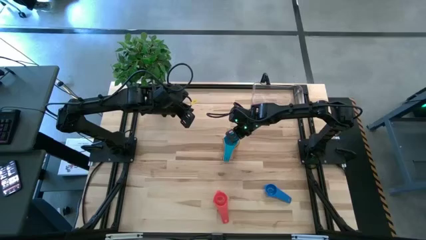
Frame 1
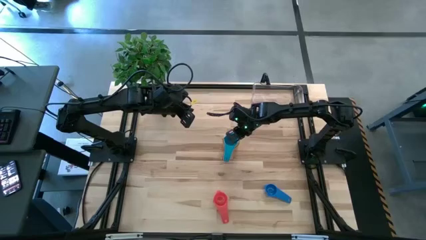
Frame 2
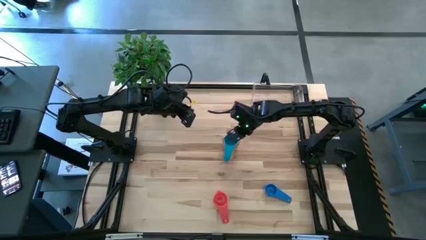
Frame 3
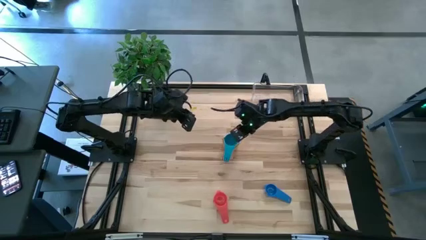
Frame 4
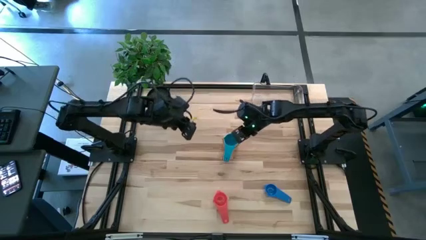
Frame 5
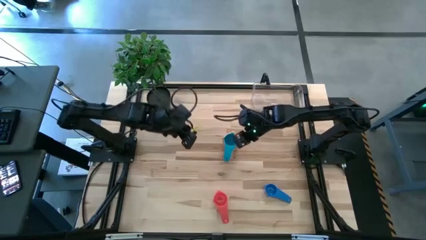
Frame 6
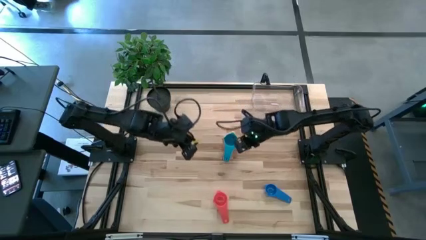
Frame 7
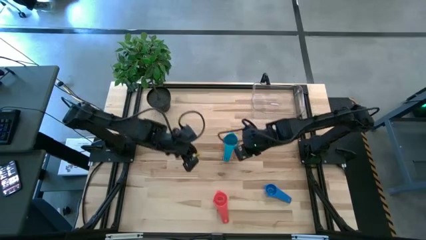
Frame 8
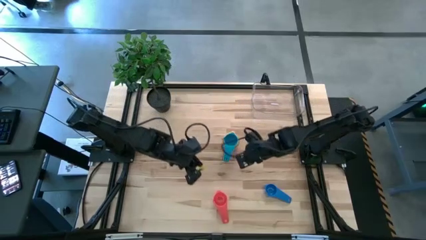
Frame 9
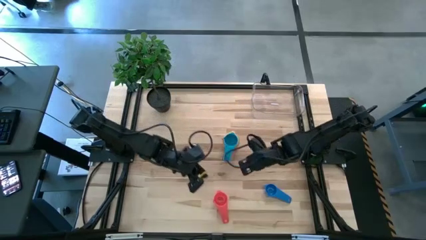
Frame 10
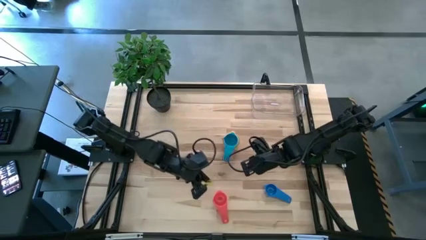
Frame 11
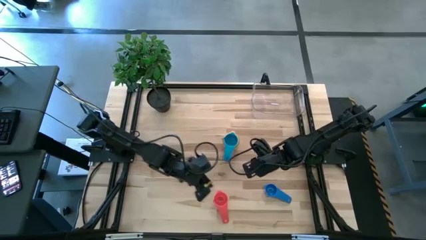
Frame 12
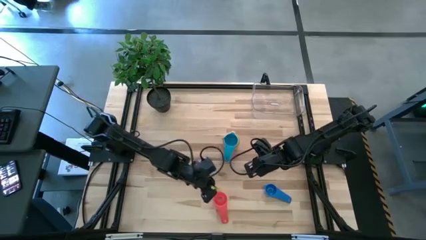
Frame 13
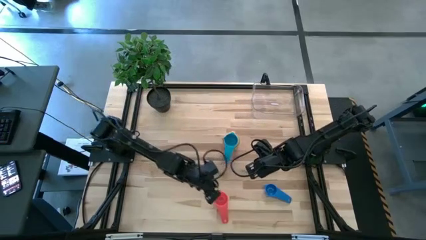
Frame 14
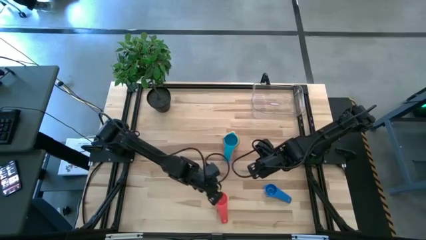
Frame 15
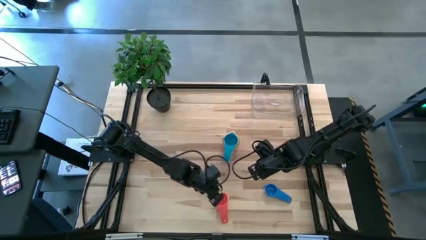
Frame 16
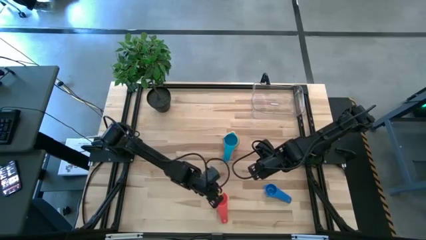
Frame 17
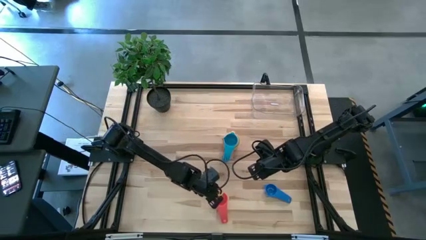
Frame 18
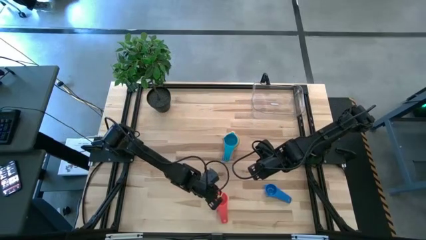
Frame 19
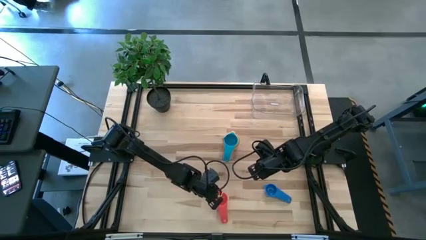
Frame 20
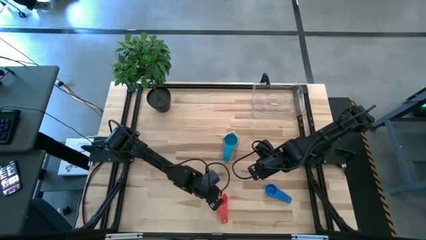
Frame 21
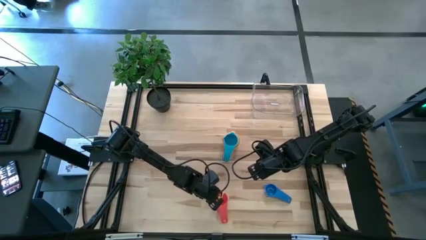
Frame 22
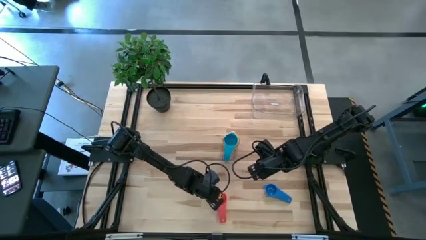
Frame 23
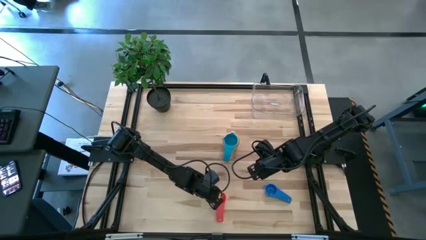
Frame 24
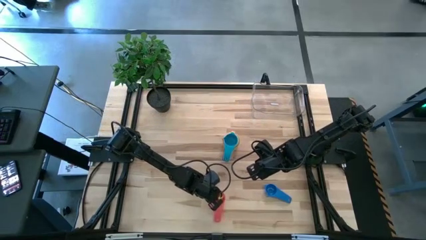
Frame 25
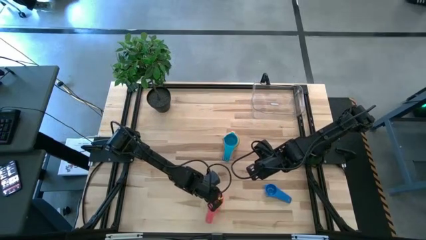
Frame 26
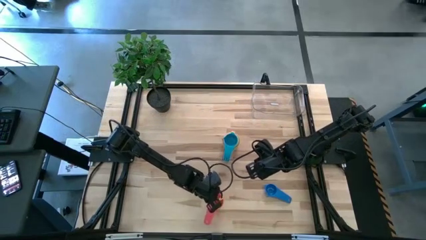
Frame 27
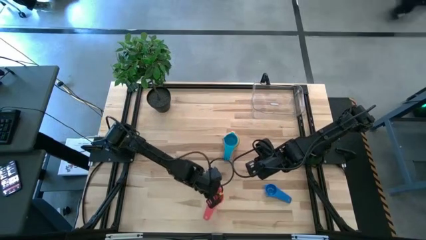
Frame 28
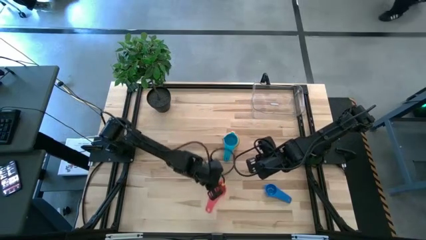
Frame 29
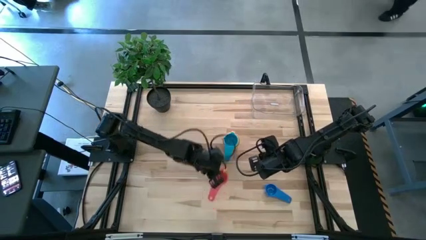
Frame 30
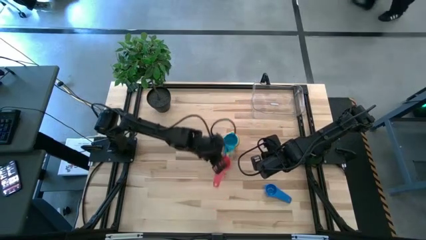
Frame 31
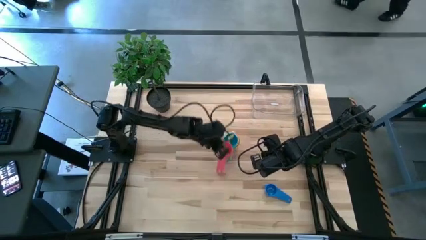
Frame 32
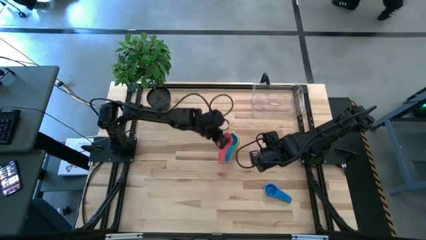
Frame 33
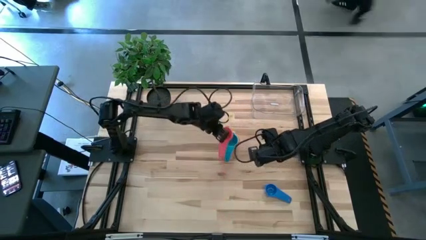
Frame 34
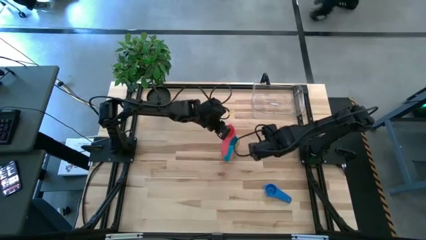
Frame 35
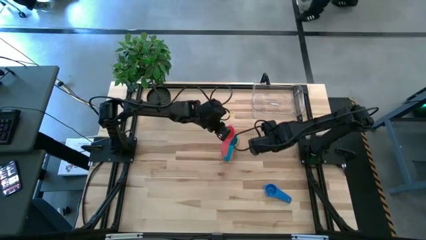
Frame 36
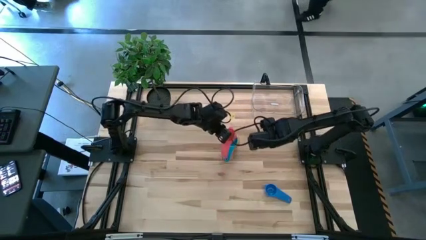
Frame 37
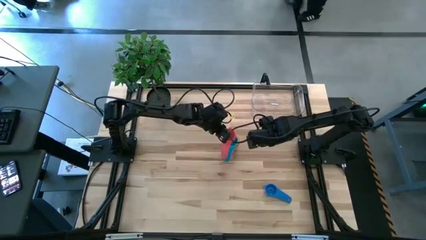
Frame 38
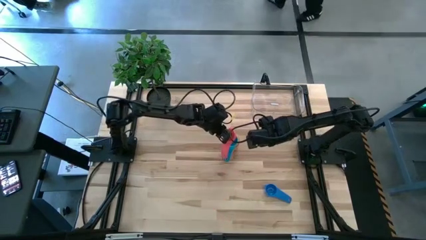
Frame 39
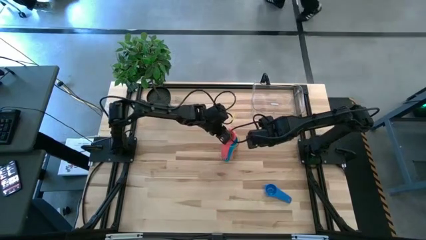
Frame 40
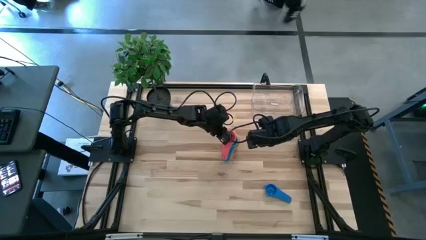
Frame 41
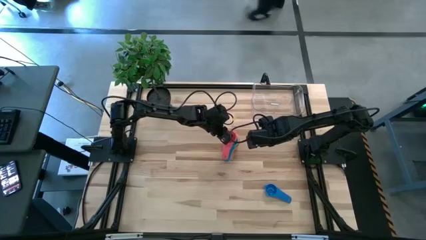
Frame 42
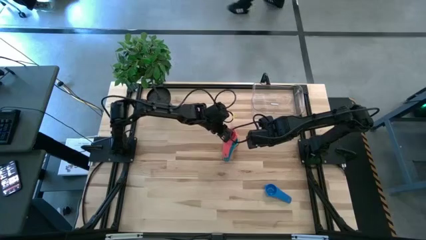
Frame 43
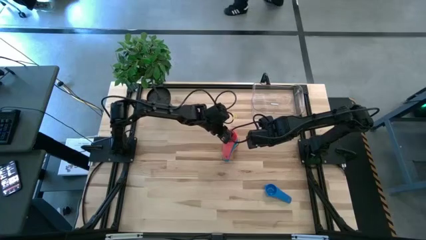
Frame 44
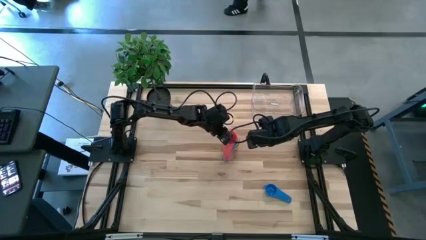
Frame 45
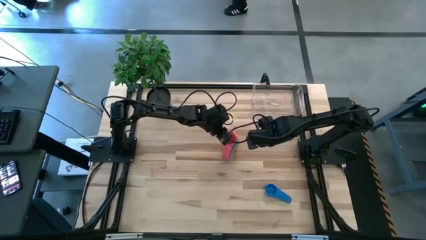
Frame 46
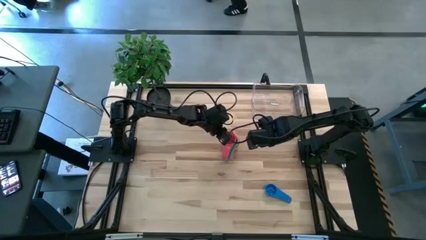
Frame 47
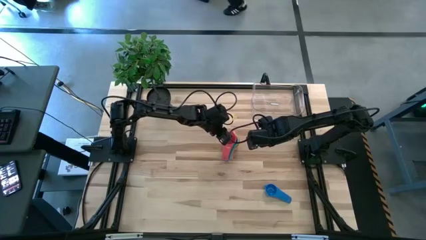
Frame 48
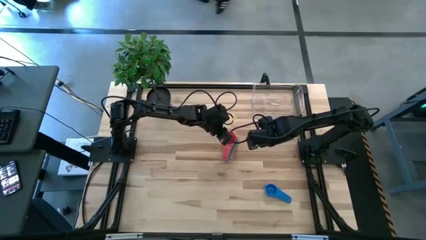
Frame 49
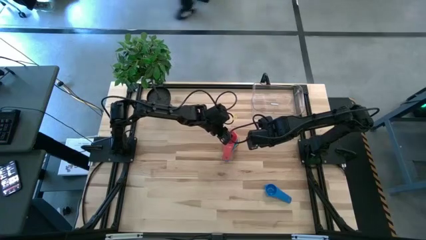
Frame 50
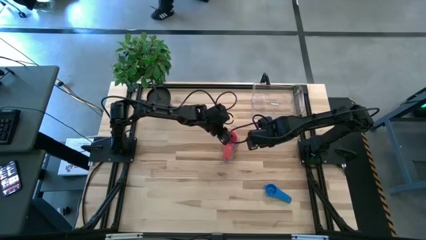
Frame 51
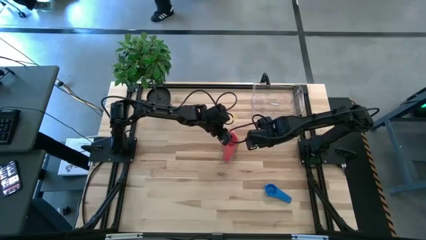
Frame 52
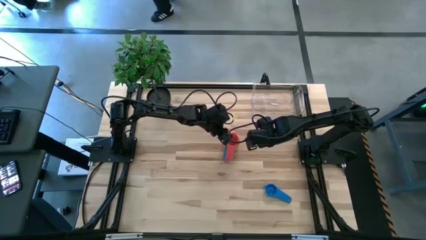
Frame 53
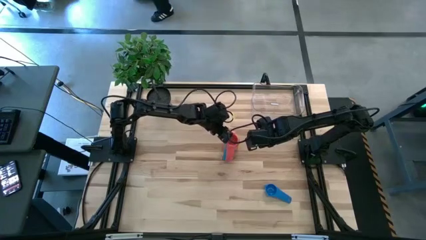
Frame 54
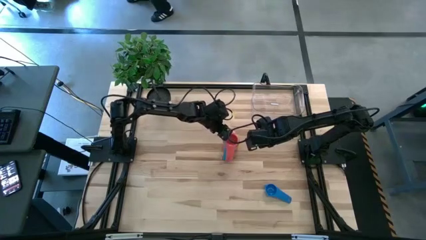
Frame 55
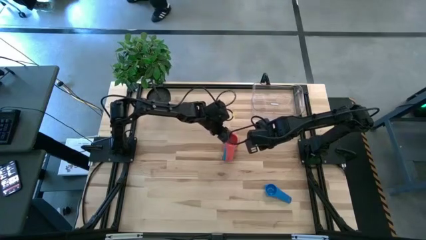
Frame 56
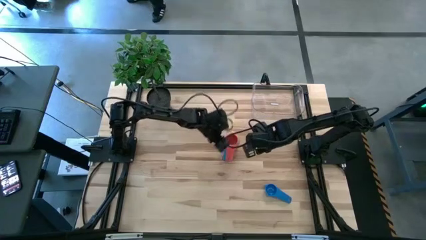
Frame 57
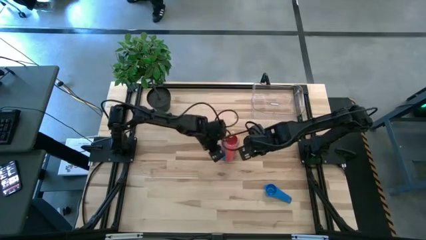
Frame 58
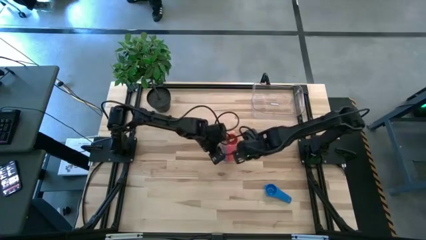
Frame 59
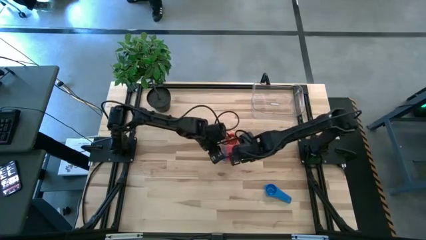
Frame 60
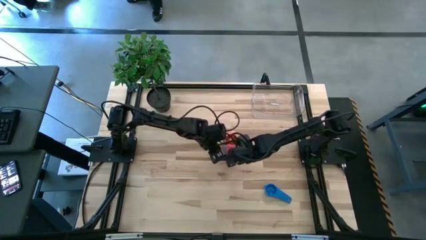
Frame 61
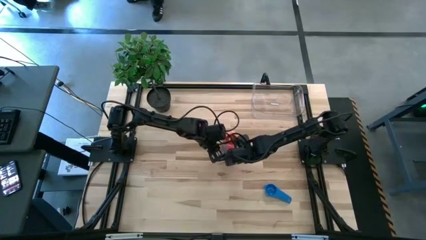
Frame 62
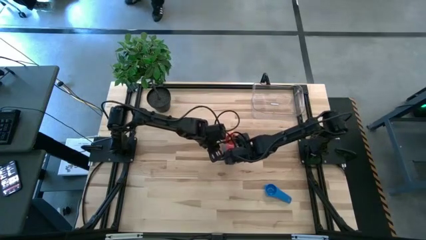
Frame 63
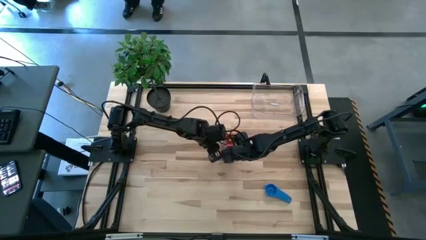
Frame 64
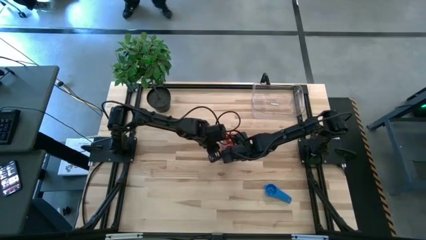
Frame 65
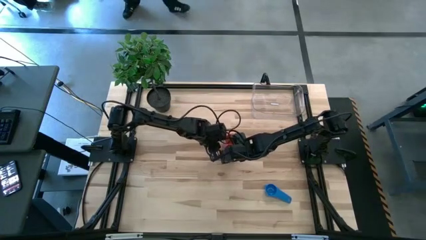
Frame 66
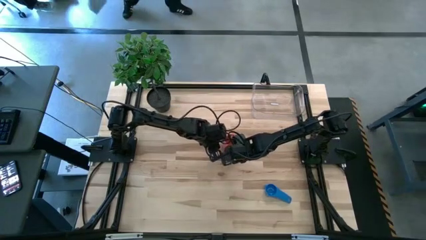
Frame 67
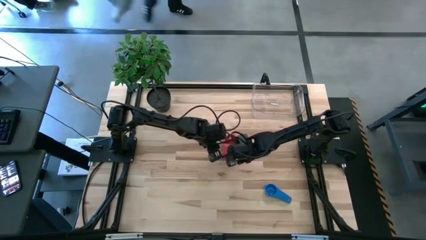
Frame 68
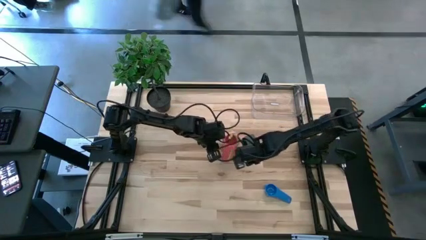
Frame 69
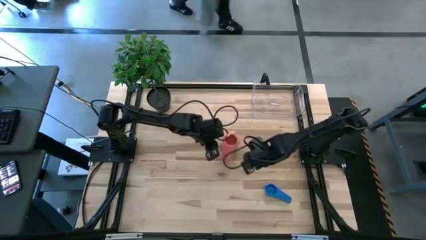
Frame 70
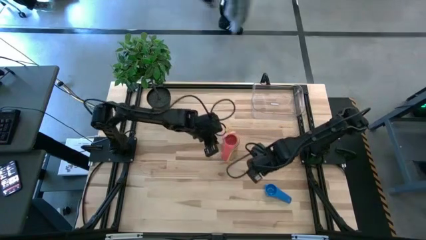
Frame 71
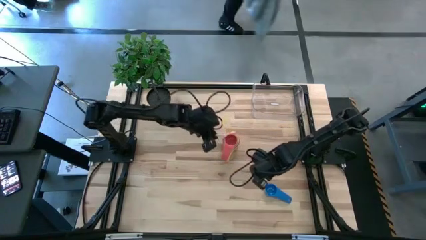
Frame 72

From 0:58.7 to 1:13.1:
Task: Nest measuring cups in basket
Stack the red measuring cup on the light blue measuring cup

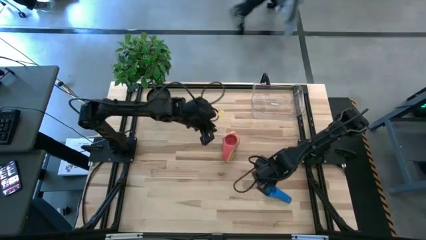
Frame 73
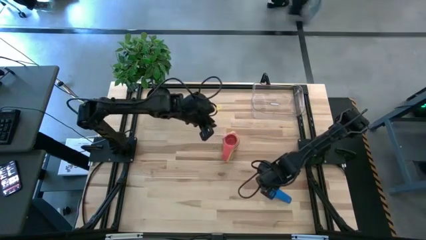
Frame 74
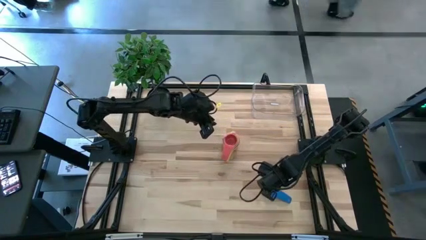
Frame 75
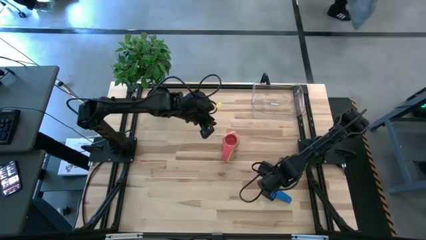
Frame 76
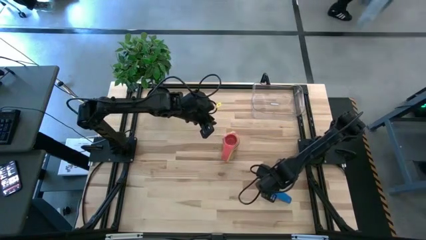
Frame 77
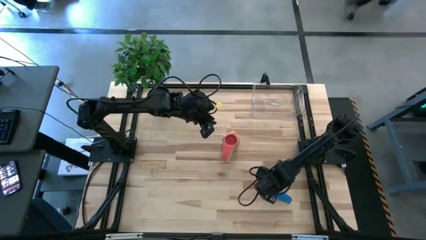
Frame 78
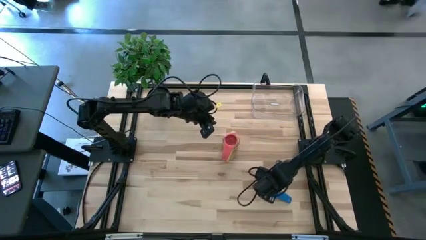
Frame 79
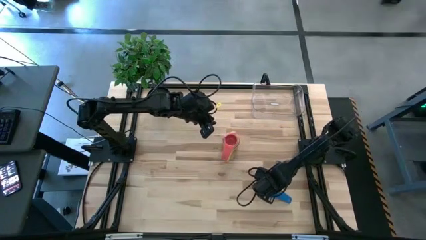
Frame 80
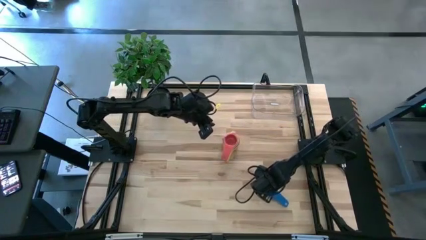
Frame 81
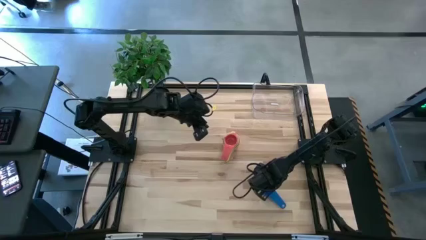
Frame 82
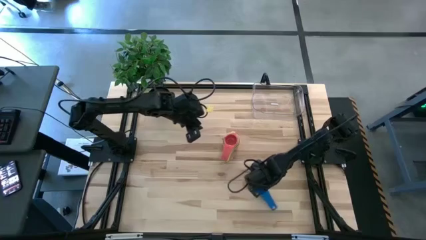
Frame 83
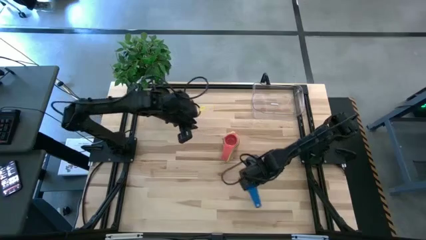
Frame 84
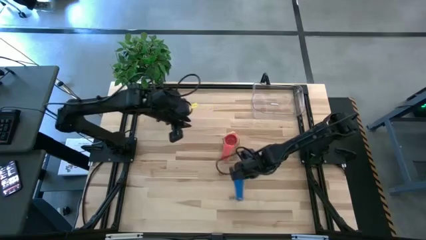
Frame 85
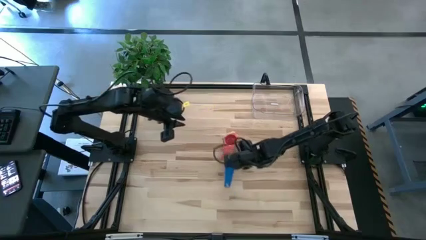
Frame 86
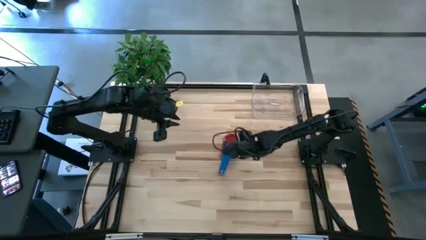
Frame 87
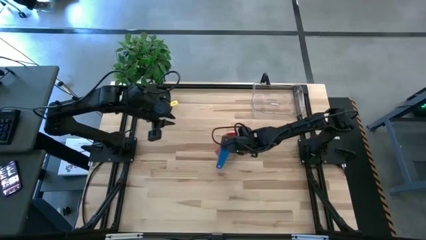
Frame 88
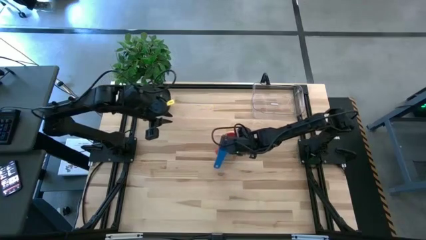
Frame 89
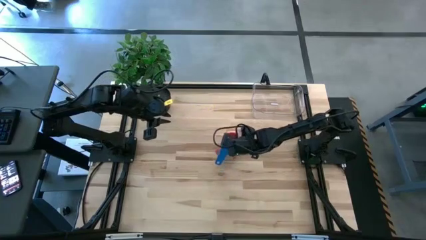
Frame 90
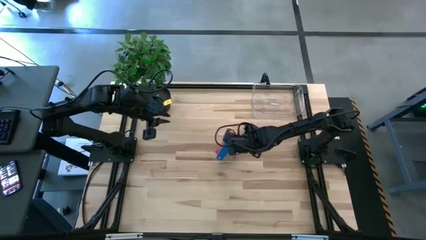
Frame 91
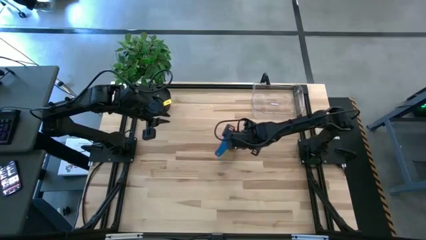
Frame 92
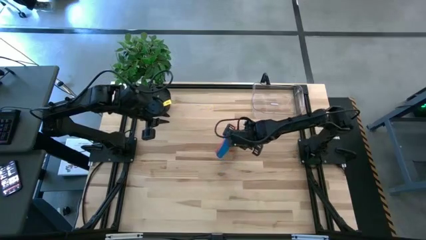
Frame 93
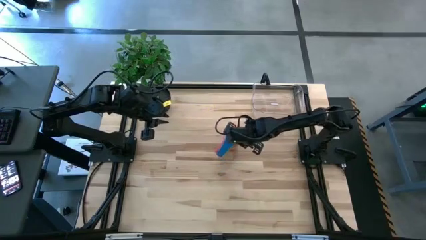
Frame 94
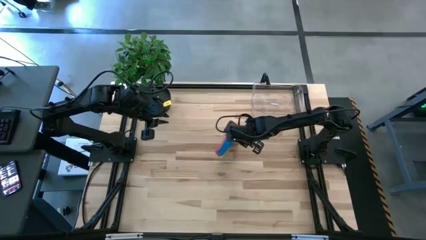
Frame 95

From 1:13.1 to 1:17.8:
Stack the blue measuring cup on the orange measuring cup
